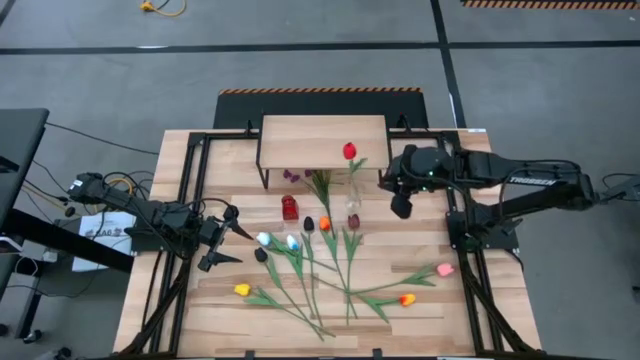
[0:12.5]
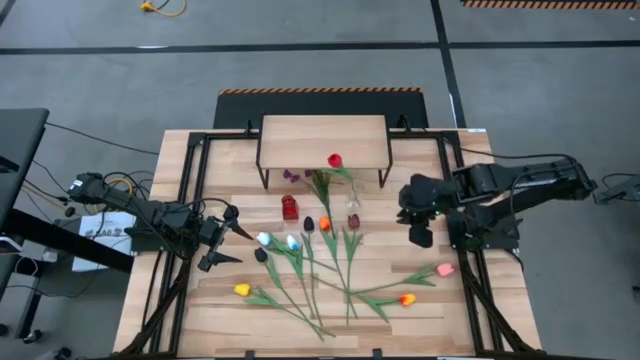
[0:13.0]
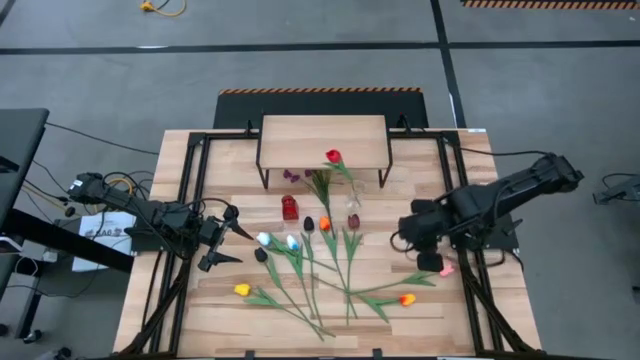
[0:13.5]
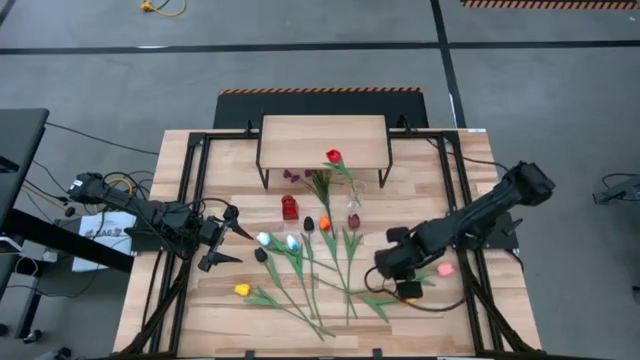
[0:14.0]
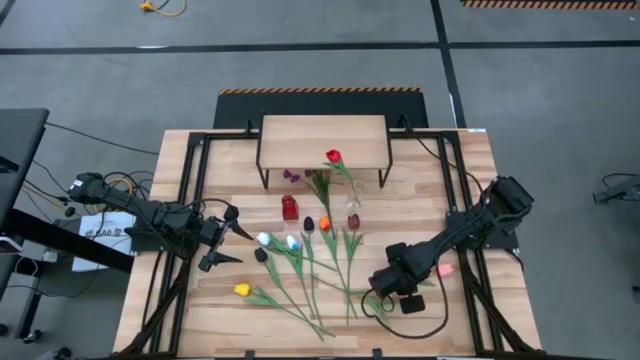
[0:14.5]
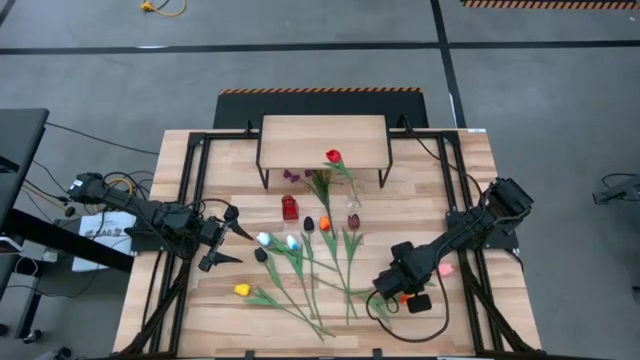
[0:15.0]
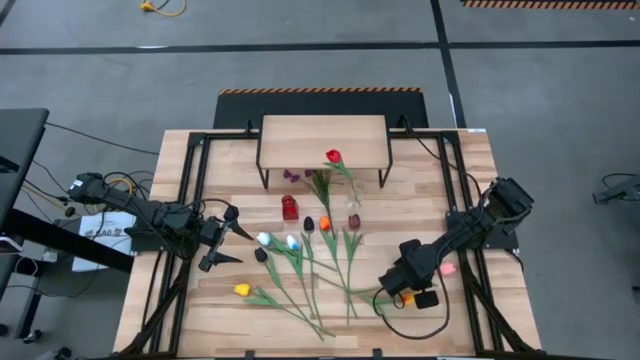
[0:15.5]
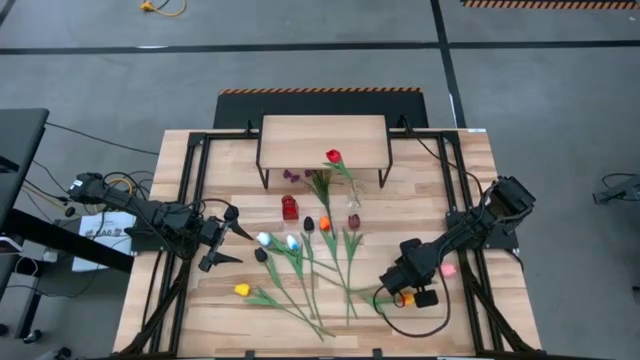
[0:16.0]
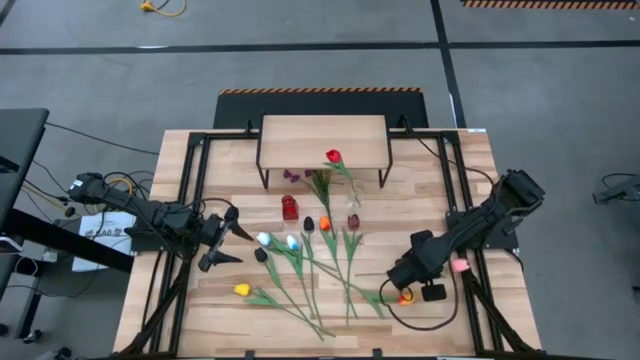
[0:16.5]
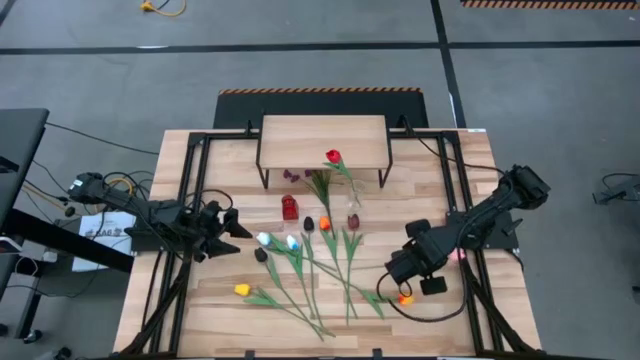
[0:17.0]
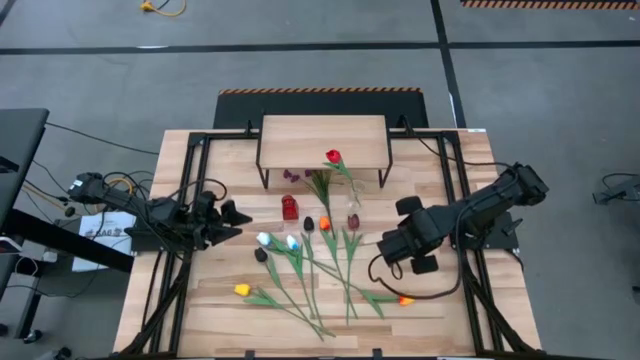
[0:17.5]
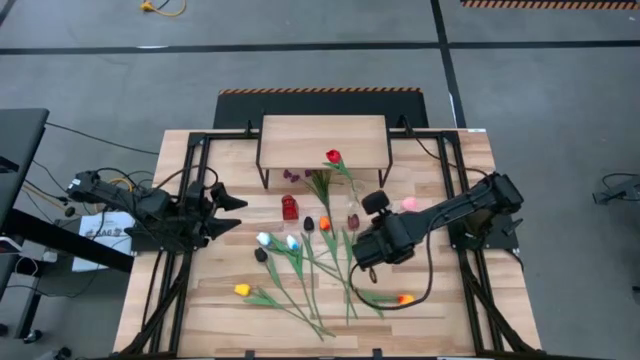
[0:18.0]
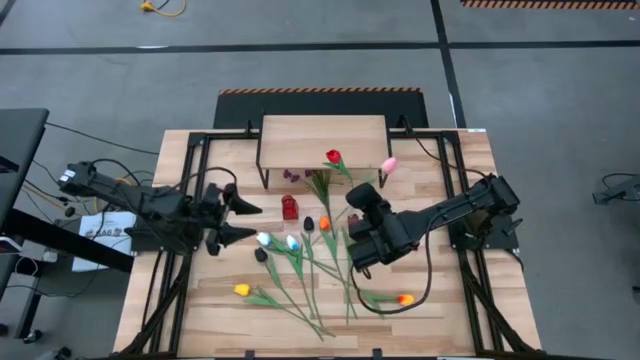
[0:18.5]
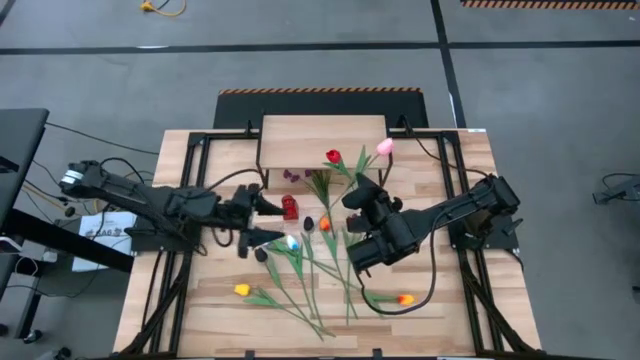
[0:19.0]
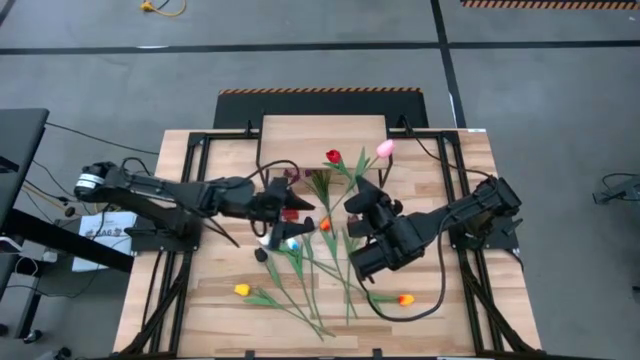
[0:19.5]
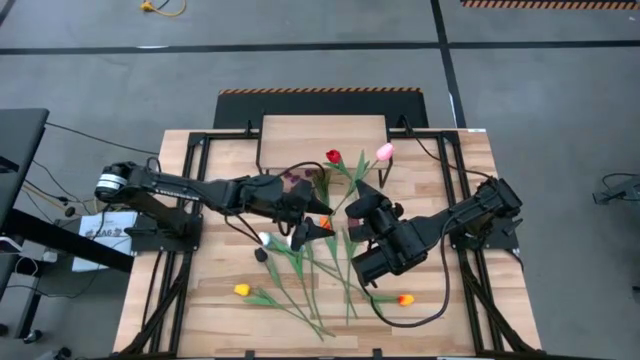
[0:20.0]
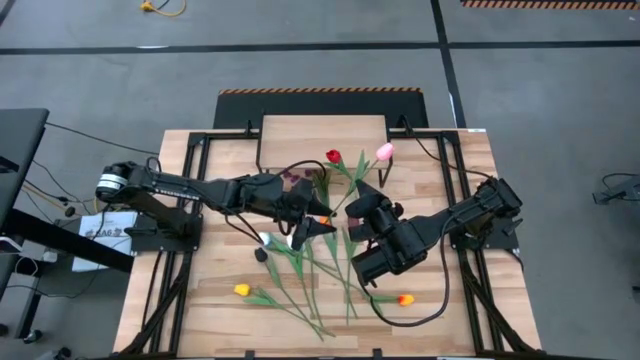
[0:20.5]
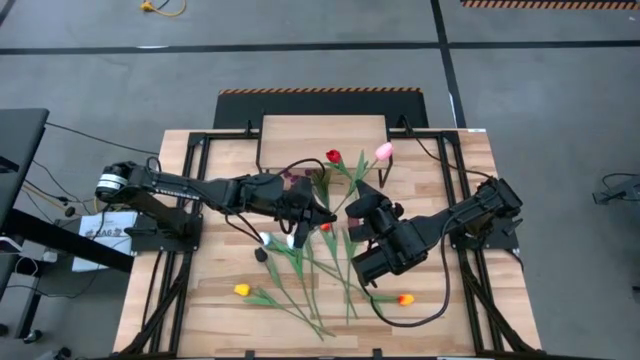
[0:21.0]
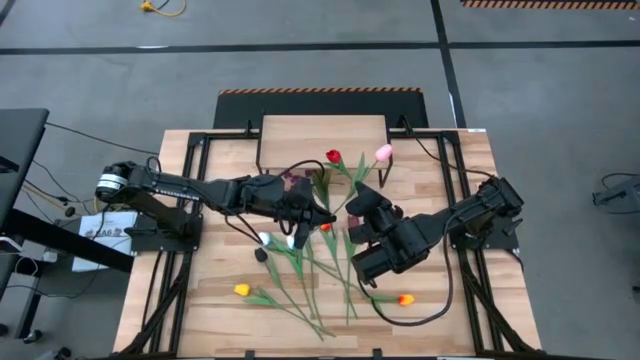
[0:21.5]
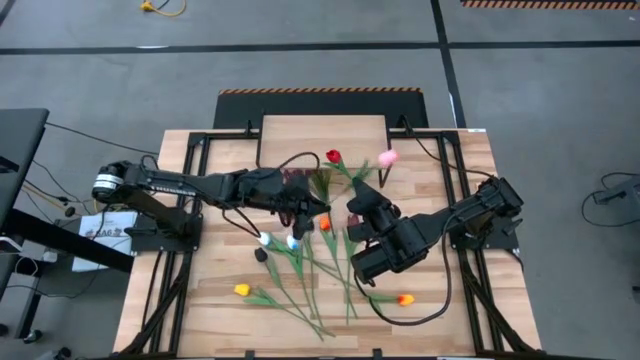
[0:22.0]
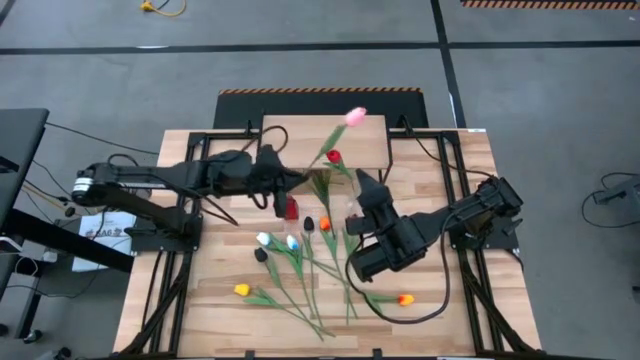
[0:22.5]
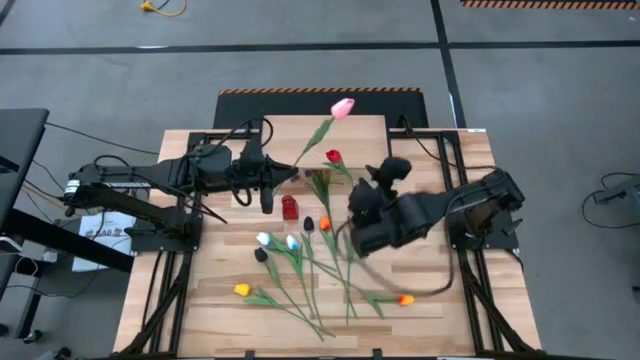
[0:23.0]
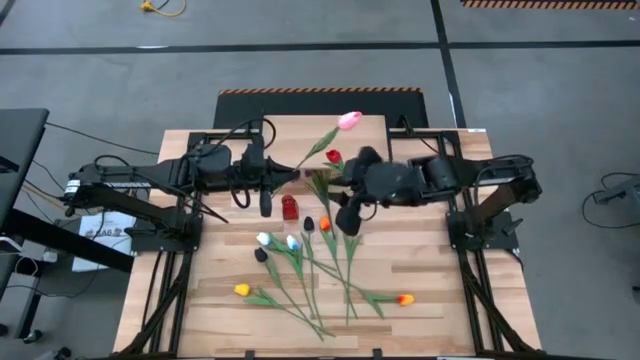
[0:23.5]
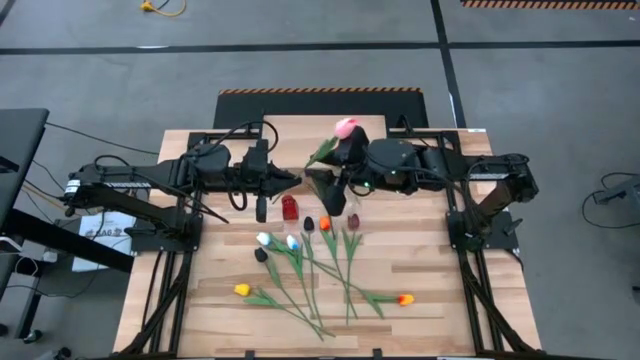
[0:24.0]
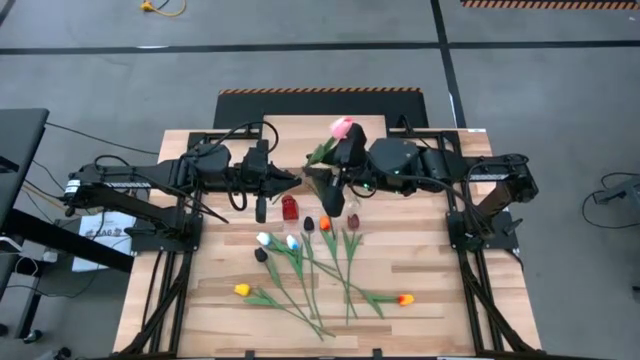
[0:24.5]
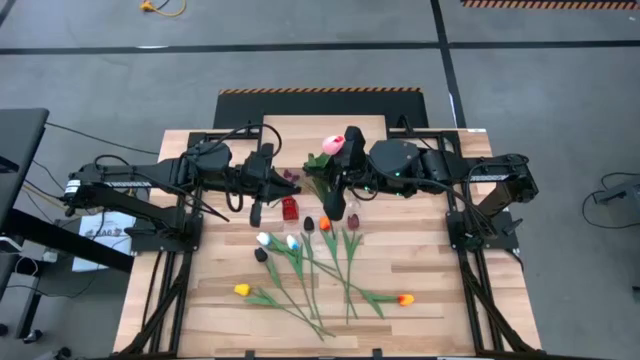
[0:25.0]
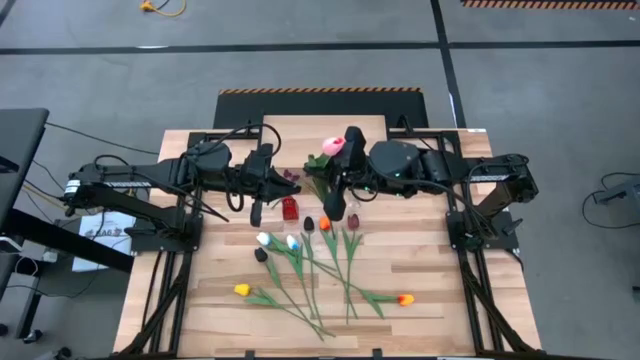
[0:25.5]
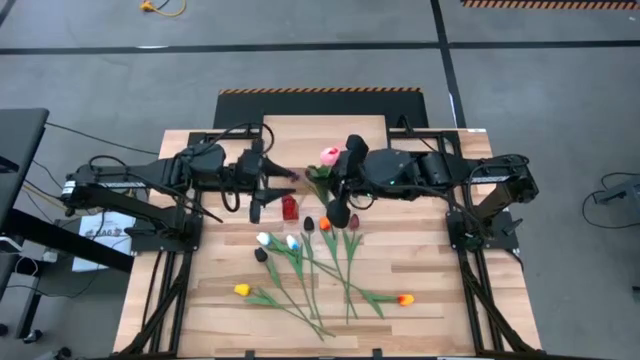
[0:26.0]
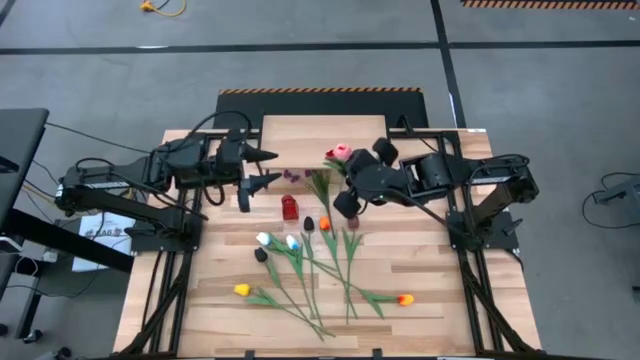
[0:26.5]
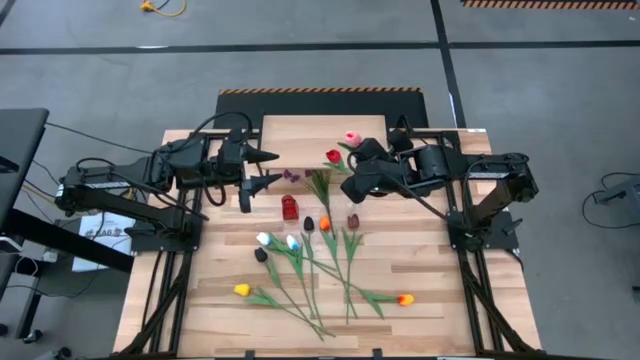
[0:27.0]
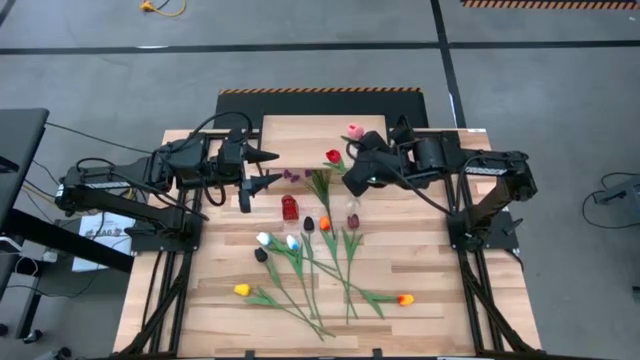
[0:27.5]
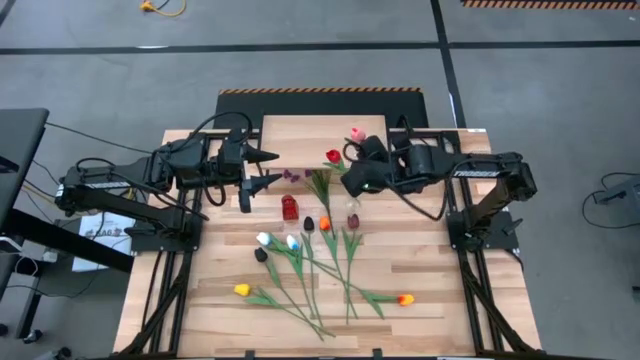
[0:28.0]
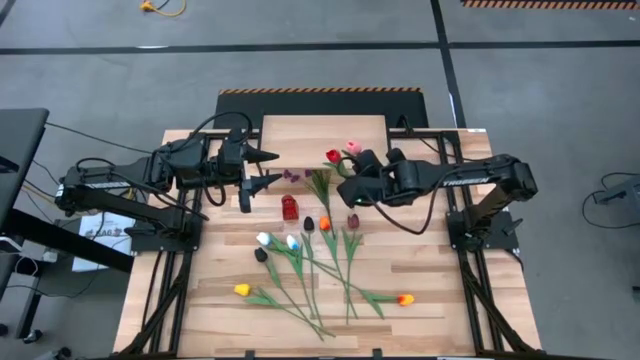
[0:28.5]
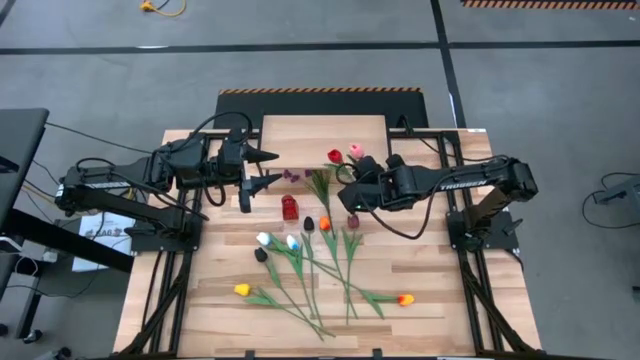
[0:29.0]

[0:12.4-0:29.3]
Task: Pick and place flowers into a vace then onto a shelf
Put the pink tulip into the transparent vase

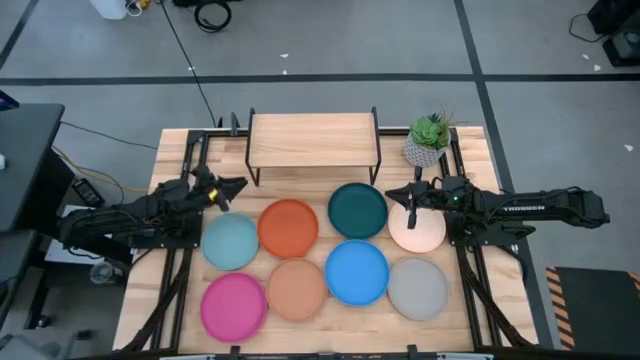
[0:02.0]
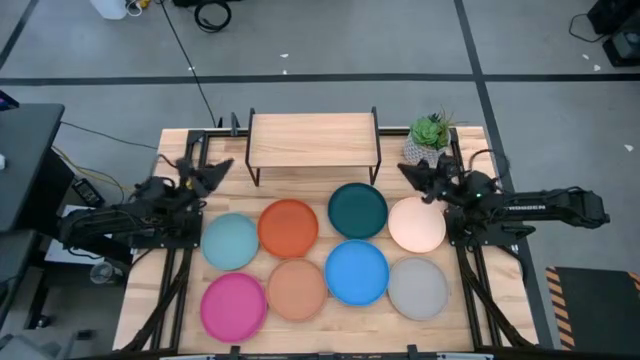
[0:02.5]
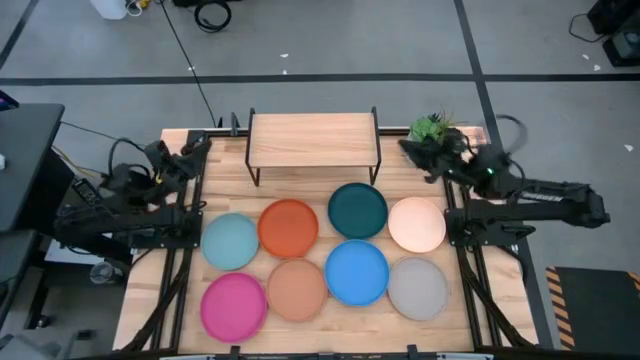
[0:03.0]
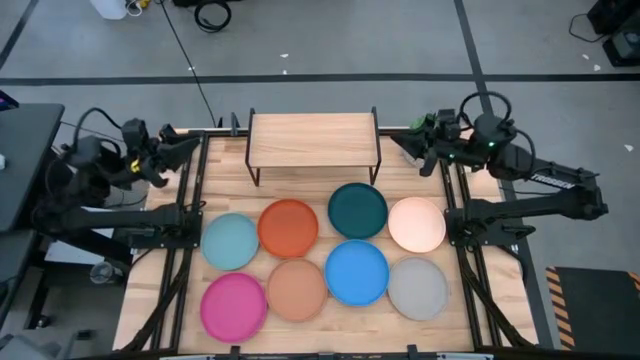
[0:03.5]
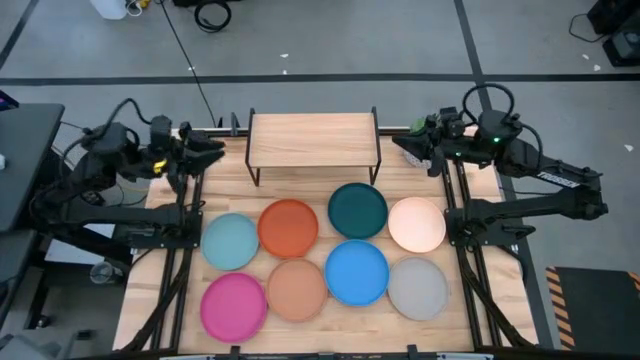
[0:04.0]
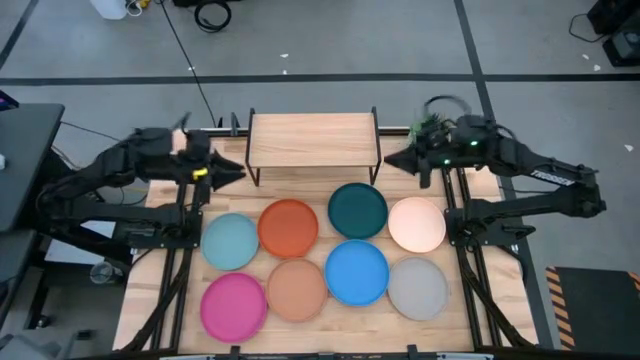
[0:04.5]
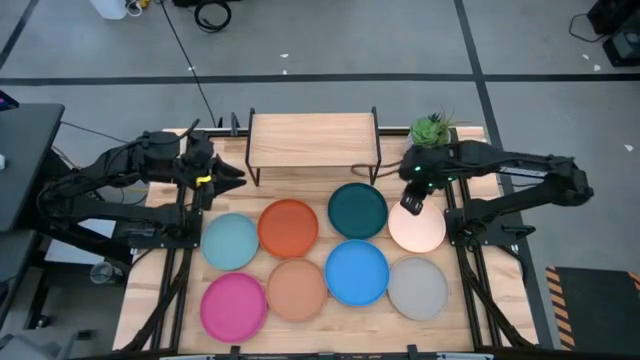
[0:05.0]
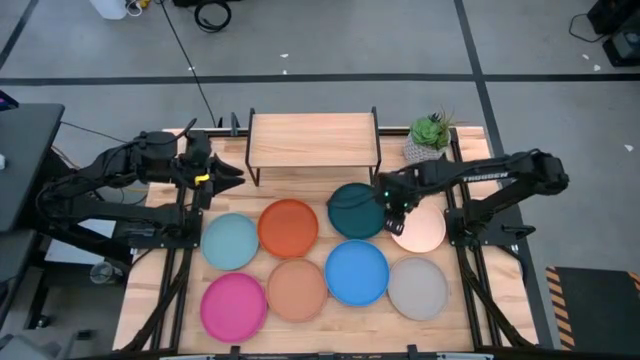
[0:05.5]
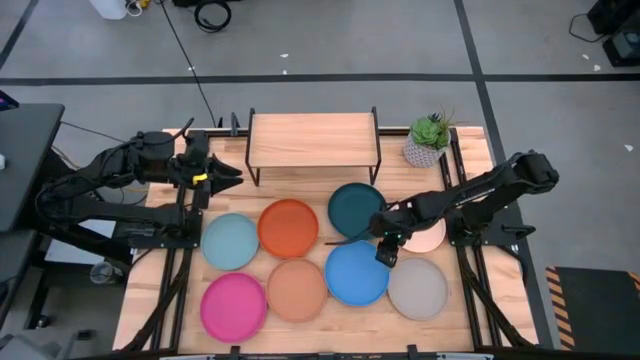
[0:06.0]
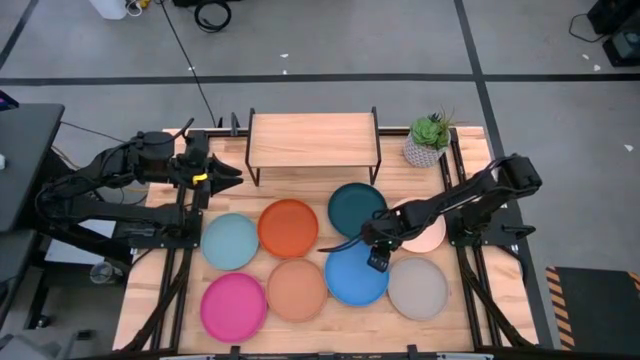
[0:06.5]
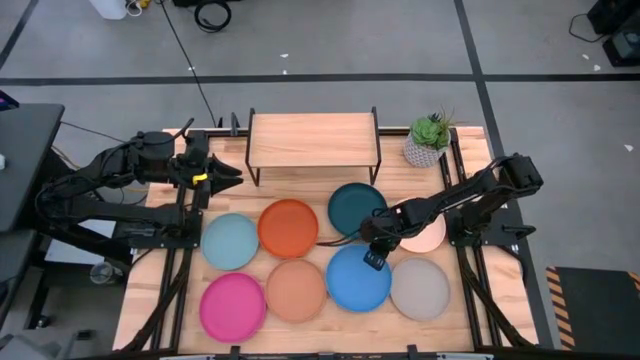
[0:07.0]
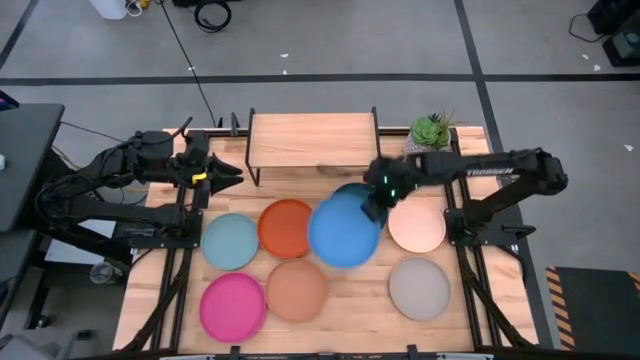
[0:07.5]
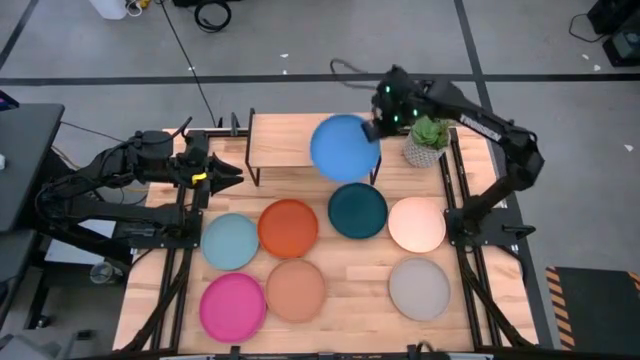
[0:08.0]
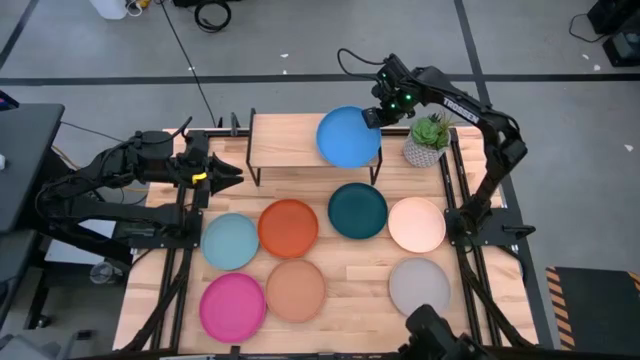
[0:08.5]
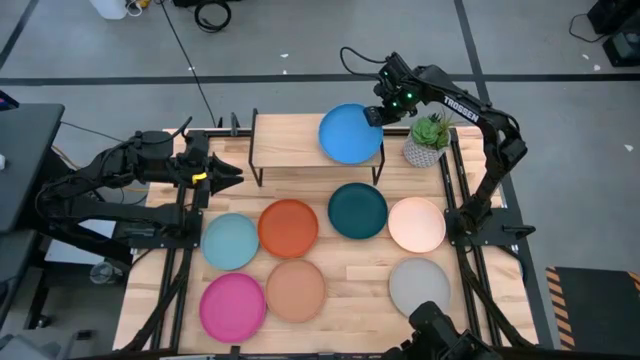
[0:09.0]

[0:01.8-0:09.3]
Task: Place and stack plates onto a shelf
Put the blue plate on the shelf
